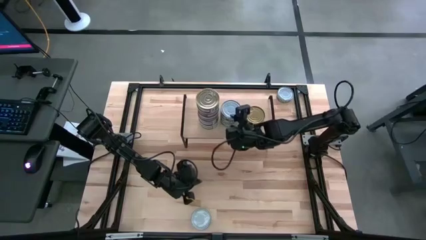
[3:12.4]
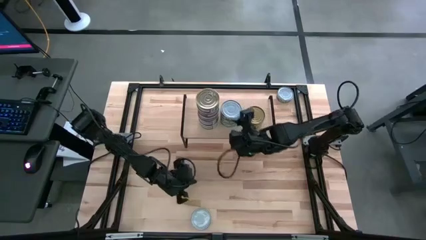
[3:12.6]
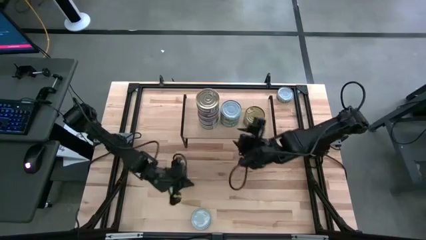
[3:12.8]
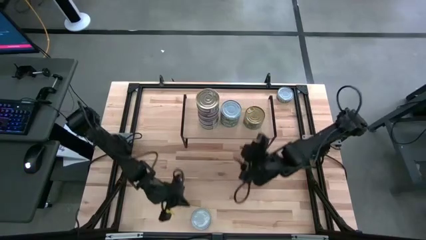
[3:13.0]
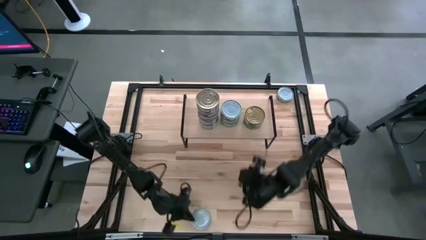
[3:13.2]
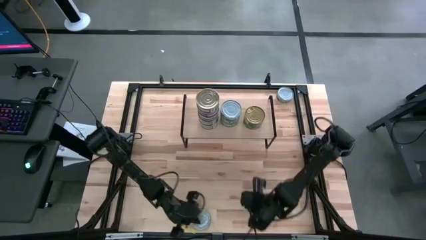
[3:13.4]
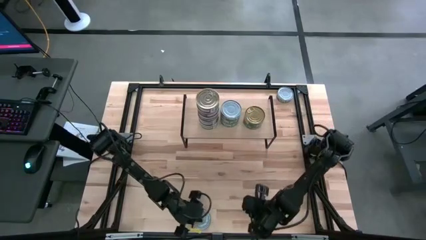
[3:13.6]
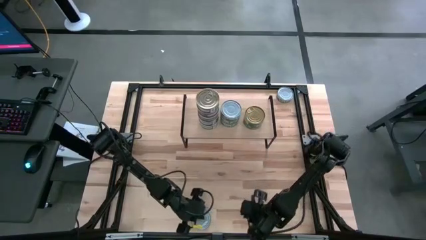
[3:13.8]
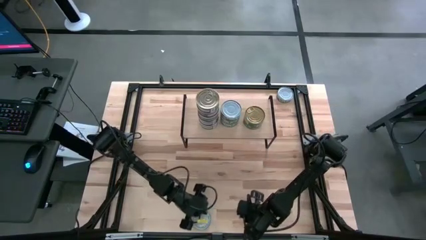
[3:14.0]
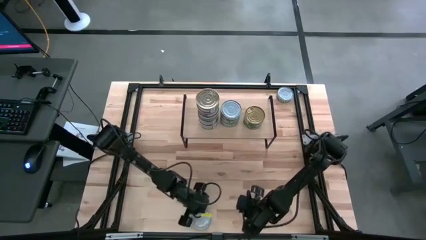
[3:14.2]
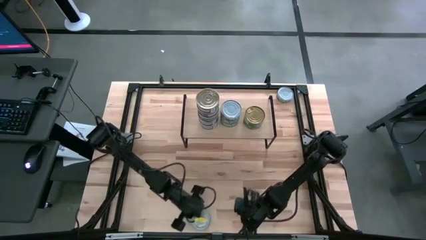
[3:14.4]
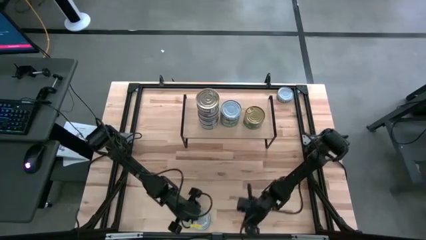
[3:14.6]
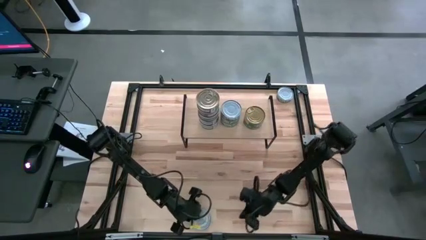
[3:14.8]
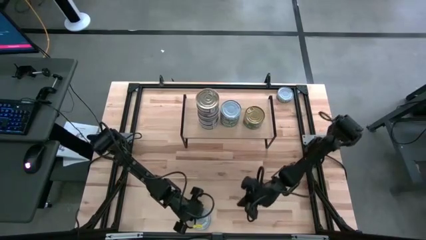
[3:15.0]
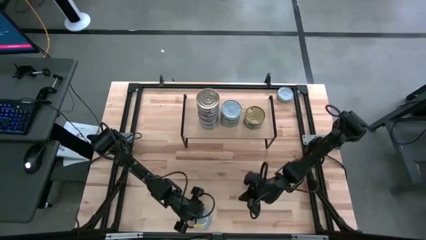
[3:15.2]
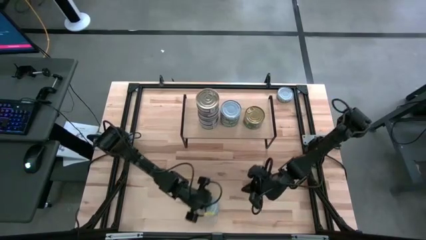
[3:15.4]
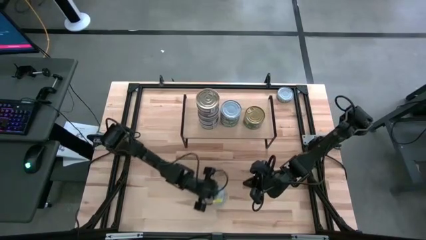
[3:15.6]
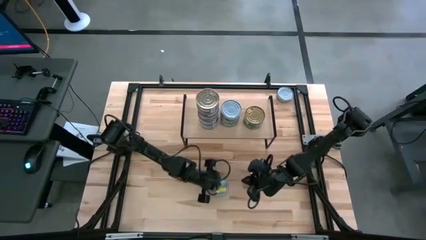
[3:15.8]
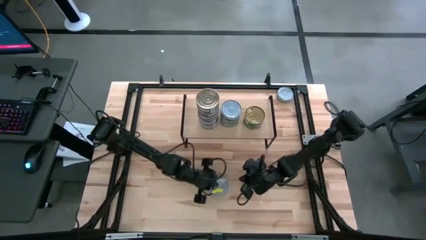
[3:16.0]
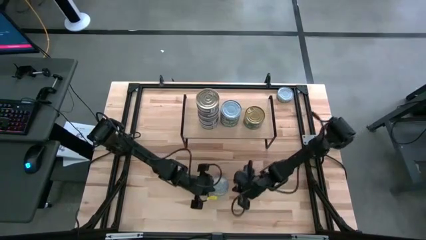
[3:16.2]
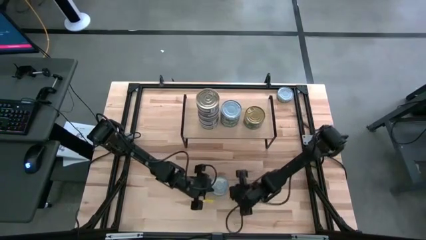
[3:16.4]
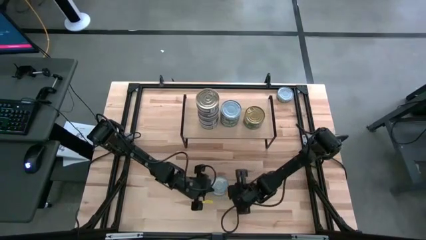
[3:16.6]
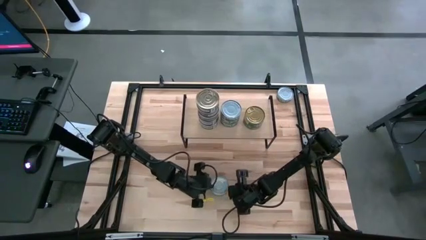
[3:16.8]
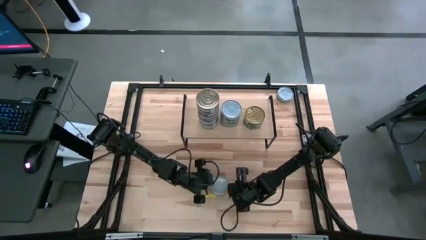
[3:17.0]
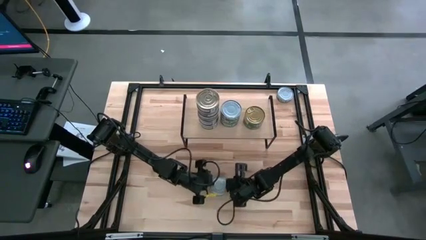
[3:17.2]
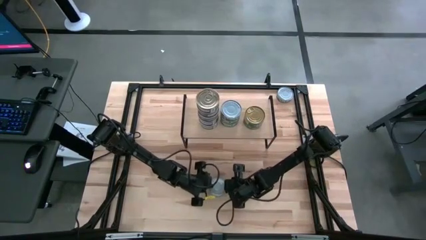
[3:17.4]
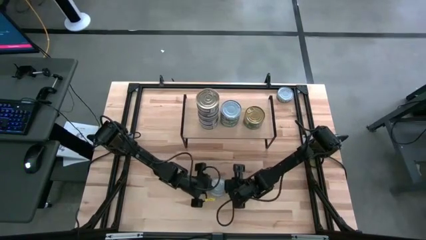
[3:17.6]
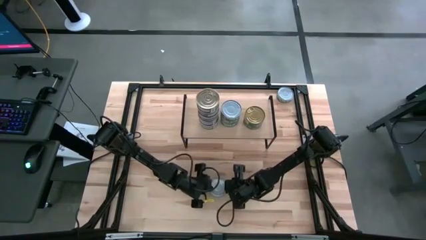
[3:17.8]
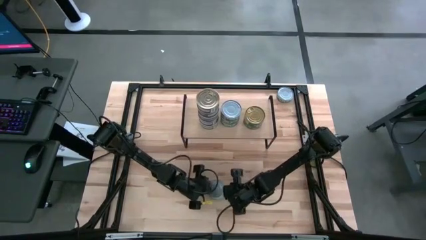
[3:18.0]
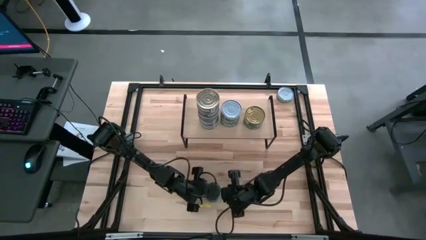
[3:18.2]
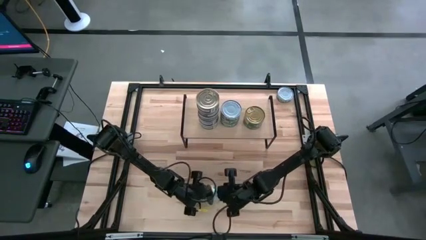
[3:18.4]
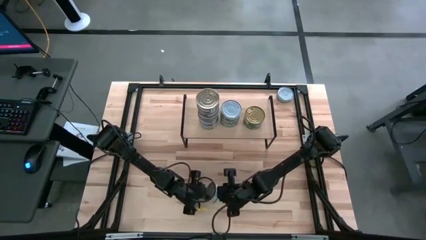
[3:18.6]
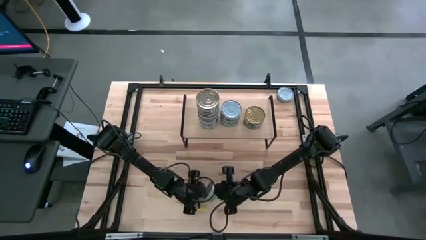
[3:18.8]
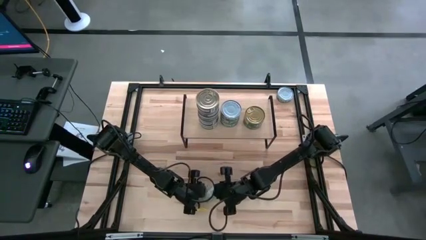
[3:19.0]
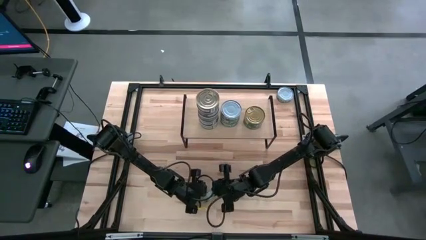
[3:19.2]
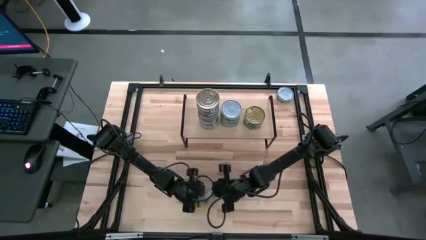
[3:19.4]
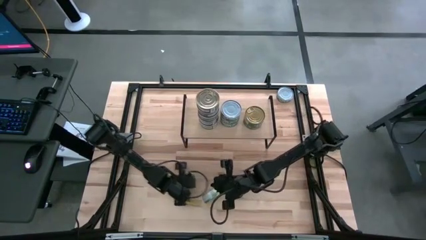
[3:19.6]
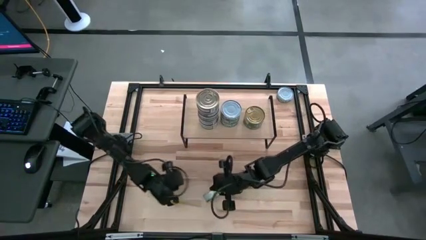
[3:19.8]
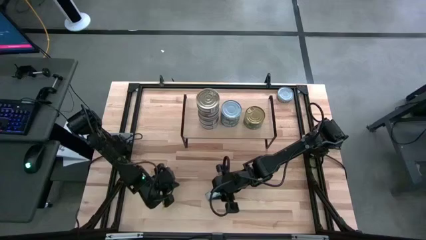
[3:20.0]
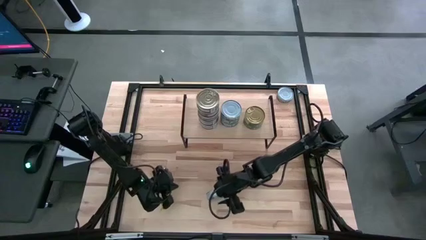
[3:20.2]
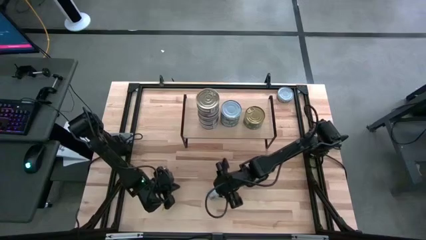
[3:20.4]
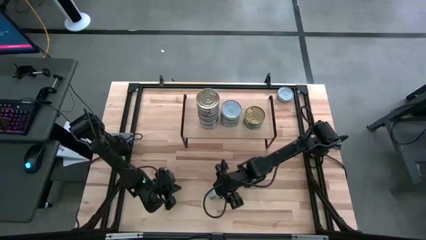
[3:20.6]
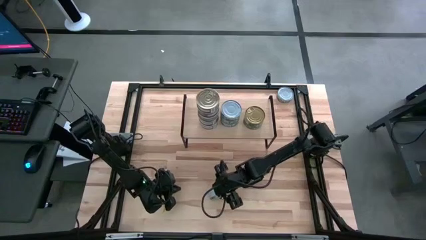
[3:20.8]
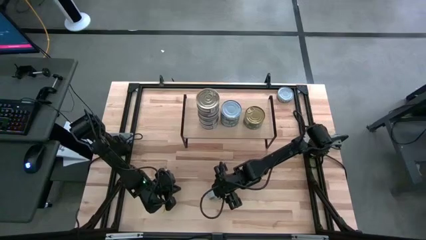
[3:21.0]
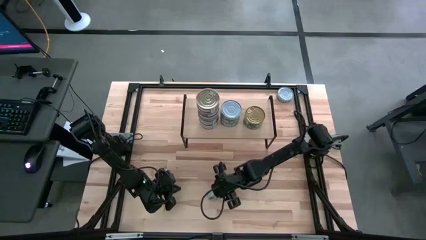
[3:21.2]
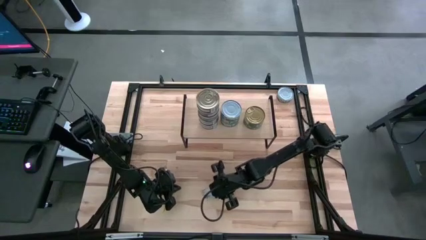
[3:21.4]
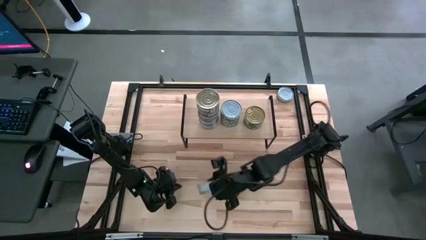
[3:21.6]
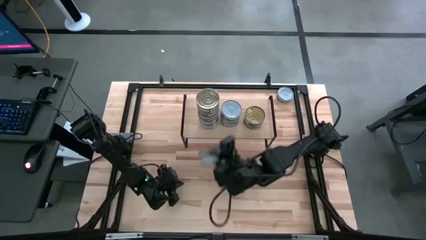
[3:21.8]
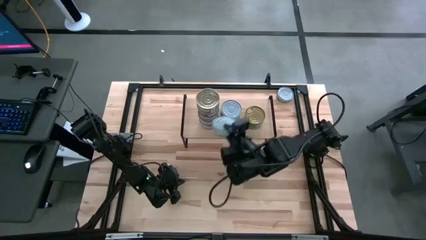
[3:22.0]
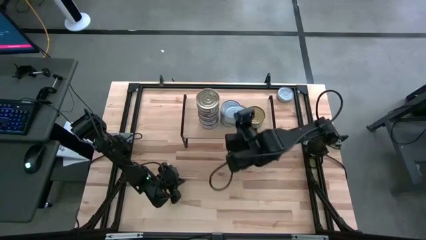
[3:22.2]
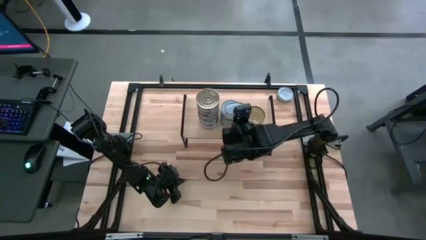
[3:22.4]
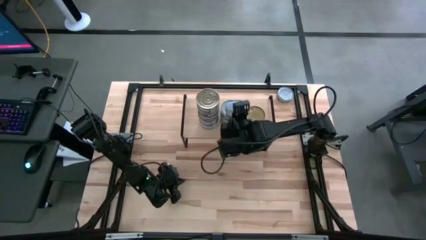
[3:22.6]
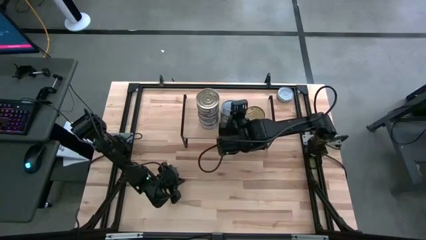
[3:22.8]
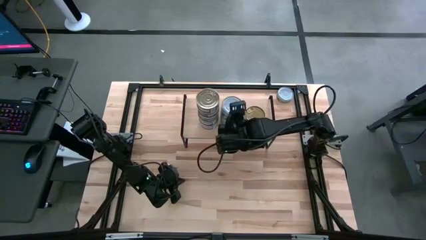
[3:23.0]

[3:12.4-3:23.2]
Task: Stack canned seafood by type on shelf
Stack the white-green tuna can on top of the white-green tuna can on the shelf

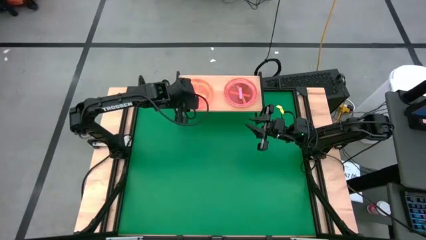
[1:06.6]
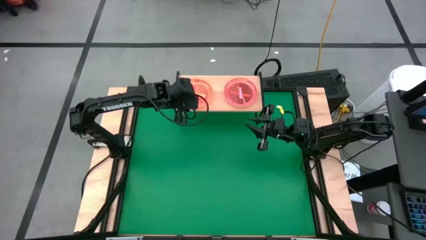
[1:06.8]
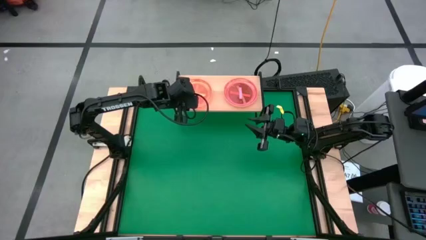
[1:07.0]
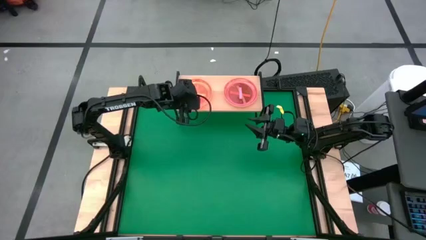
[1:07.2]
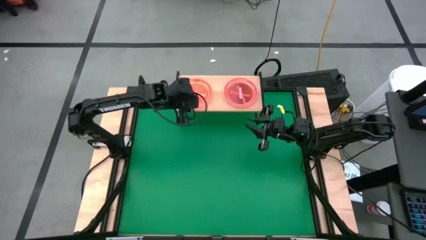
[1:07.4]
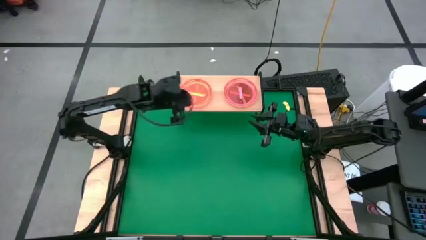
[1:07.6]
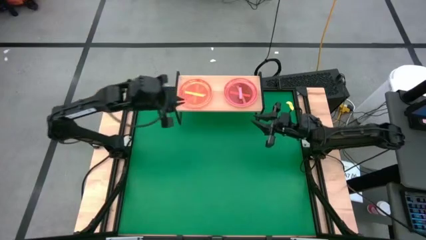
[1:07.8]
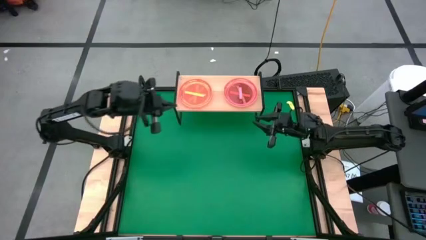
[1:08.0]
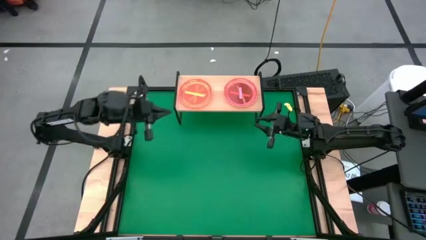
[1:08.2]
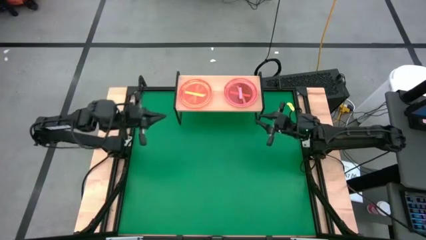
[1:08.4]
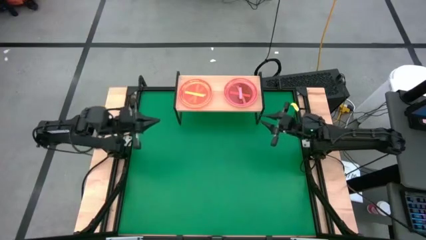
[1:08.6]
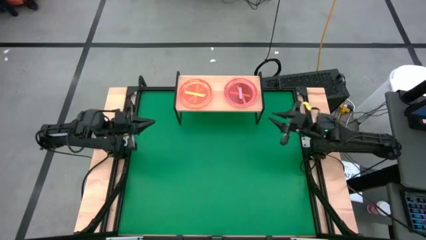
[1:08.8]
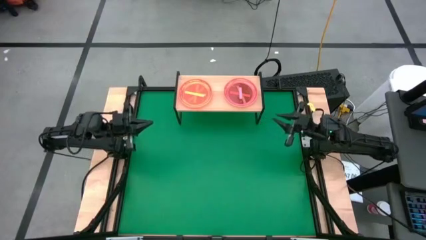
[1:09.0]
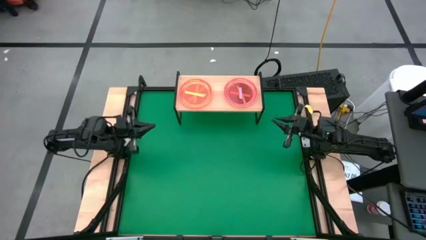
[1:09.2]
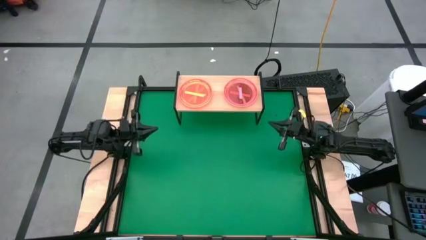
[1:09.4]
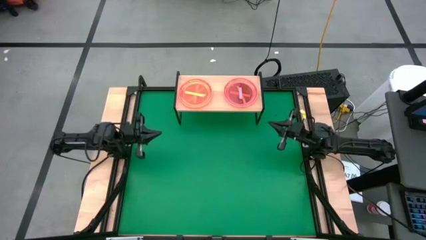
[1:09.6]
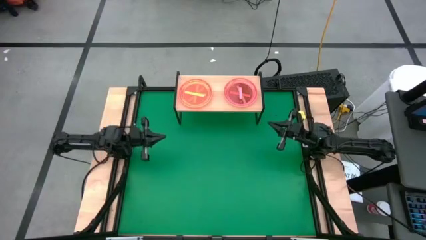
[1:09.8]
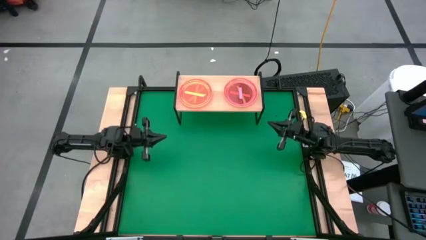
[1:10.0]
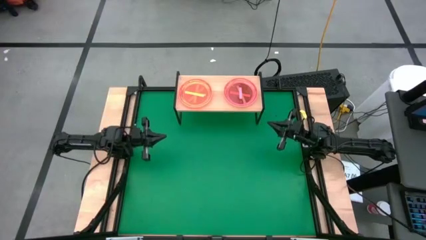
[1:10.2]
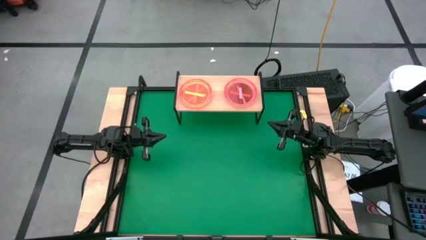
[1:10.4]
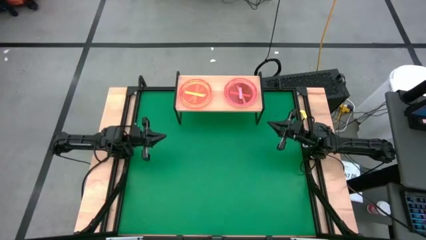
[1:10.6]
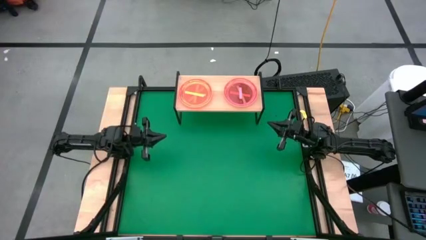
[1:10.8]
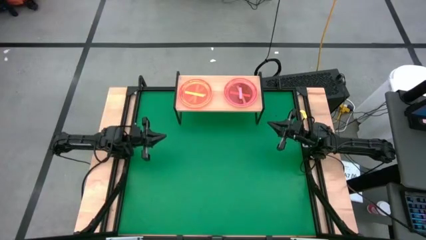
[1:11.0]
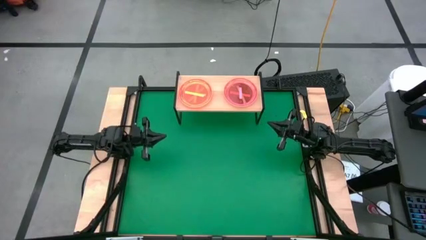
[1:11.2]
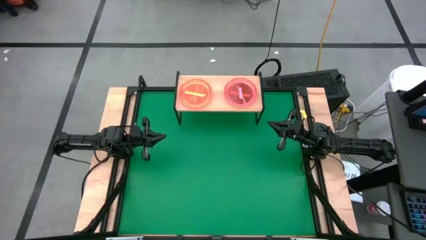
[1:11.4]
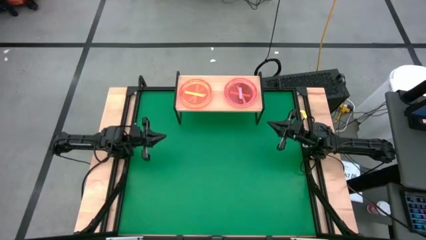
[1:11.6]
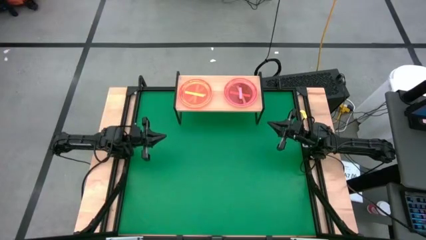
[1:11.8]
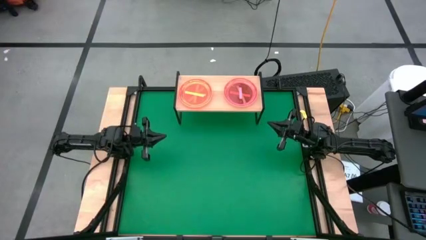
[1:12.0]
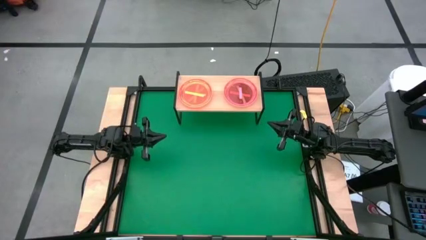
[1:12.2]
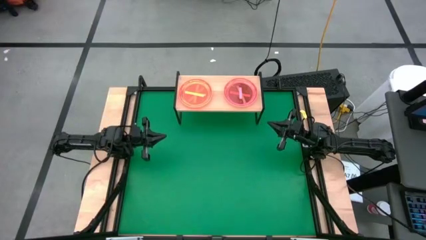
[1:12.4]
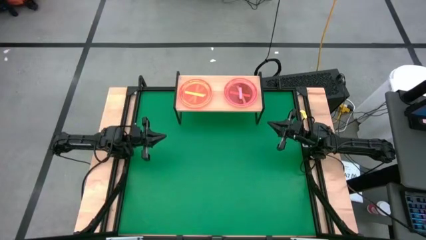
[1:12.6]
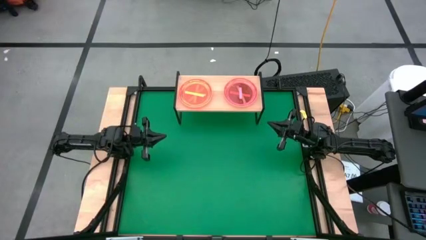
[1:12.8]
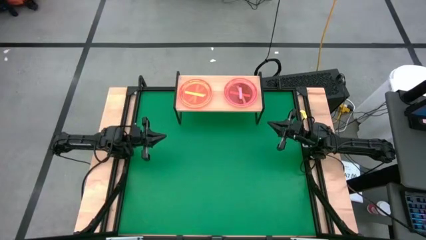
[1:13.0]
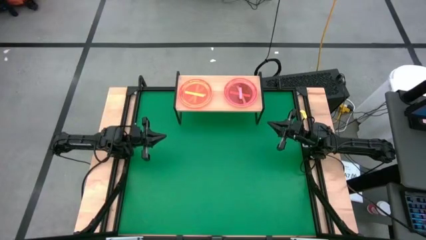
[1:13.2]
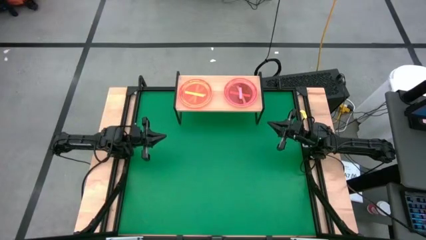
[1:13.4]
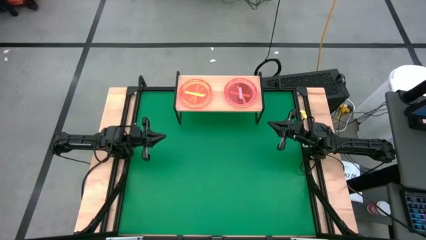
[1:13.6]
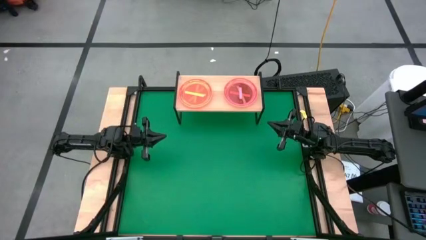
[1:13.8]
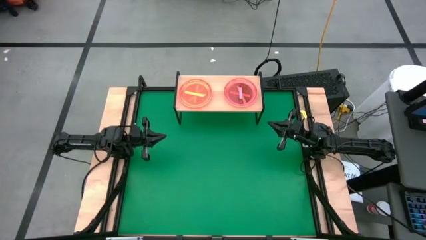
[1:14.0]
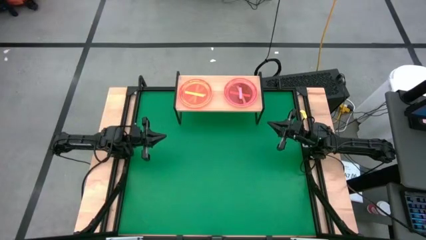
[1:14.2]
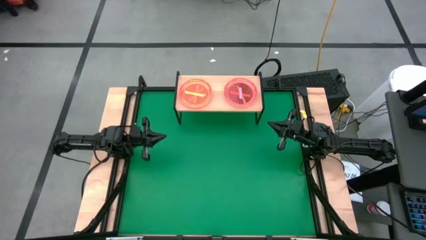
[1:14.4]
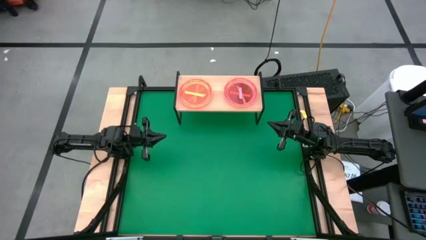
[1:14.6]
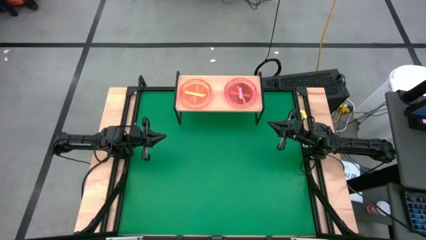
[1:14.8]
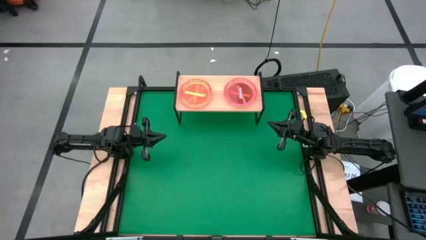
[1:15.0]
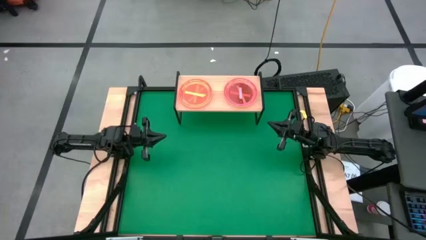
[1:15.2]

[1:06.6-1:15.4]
Task: Place and stack plates onto a shelf
Return to Home Position
